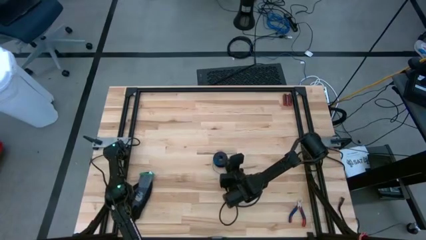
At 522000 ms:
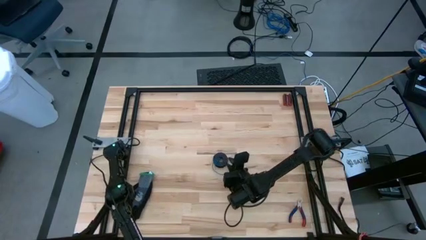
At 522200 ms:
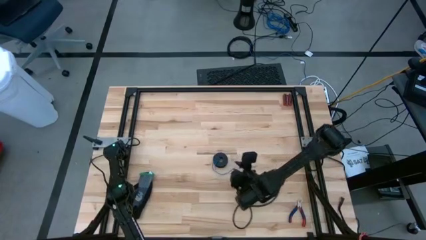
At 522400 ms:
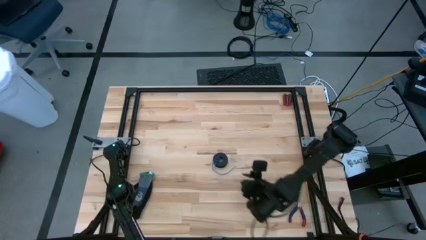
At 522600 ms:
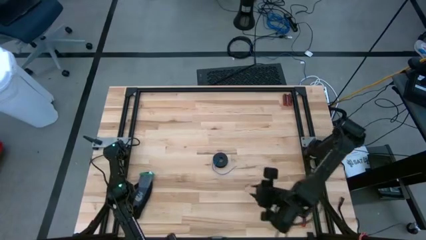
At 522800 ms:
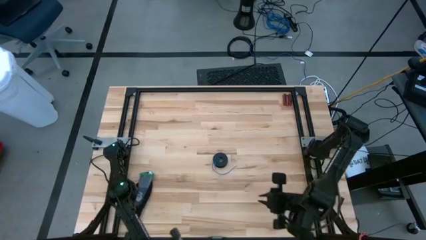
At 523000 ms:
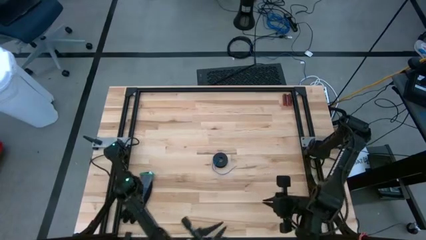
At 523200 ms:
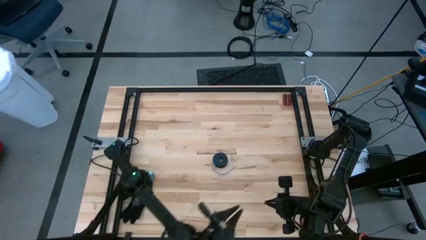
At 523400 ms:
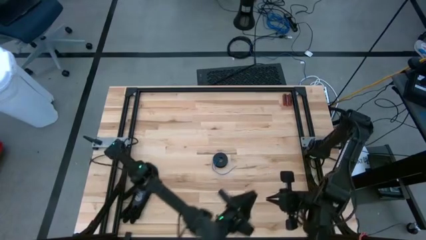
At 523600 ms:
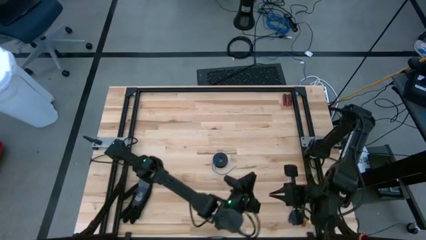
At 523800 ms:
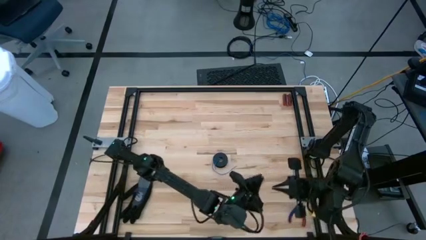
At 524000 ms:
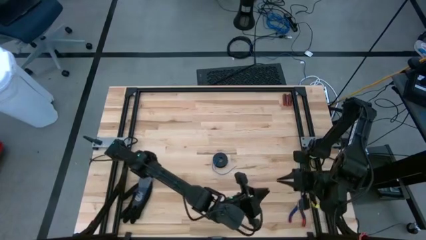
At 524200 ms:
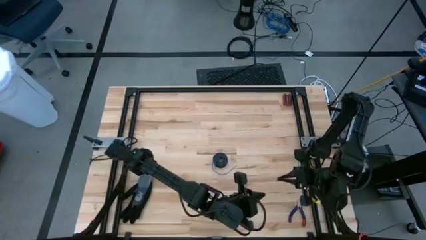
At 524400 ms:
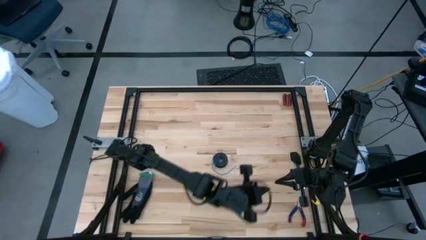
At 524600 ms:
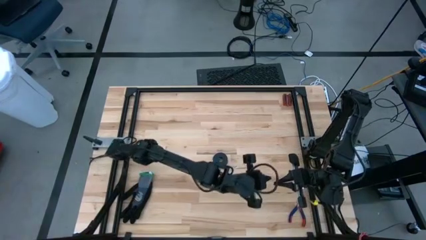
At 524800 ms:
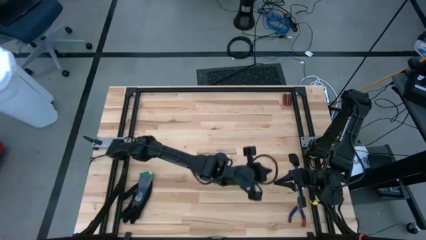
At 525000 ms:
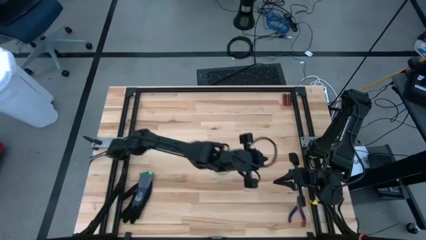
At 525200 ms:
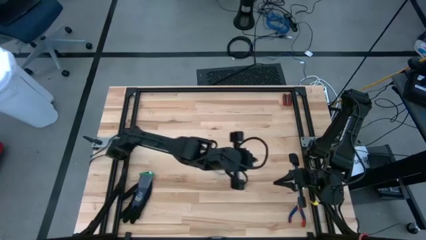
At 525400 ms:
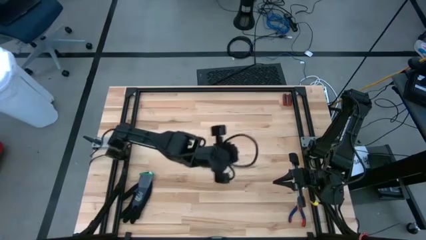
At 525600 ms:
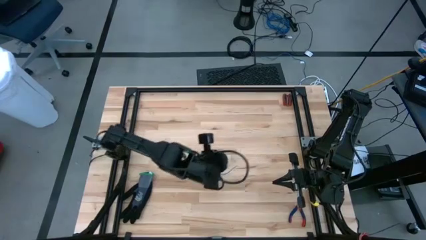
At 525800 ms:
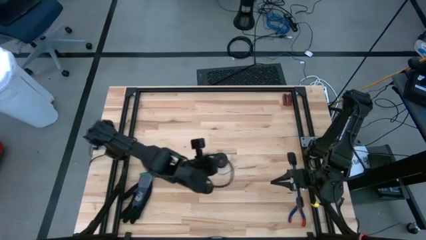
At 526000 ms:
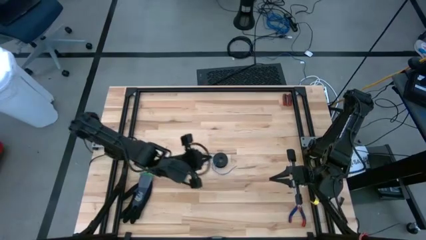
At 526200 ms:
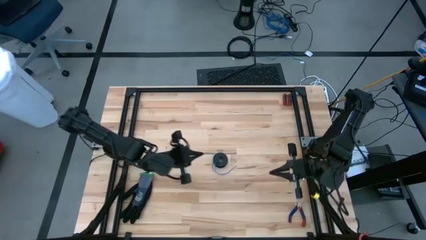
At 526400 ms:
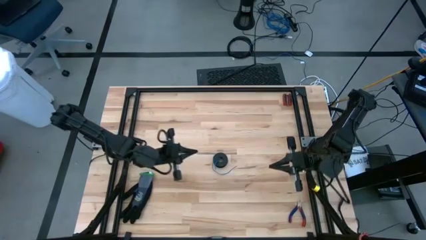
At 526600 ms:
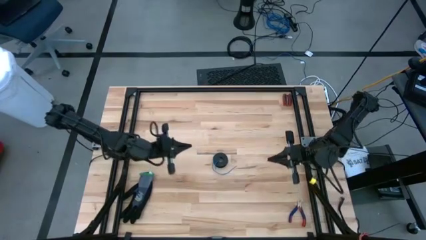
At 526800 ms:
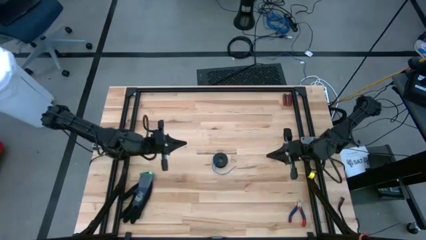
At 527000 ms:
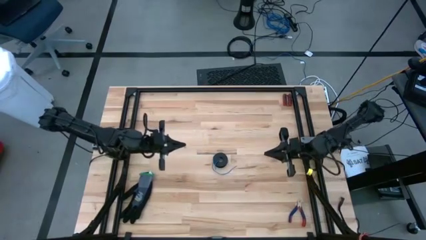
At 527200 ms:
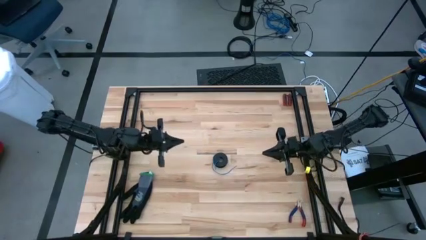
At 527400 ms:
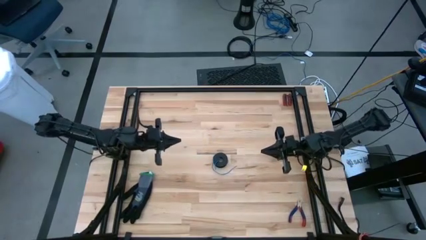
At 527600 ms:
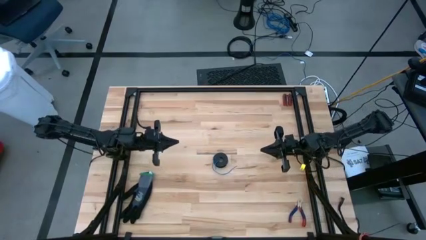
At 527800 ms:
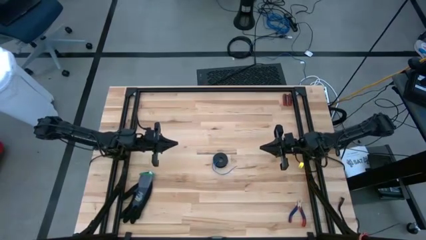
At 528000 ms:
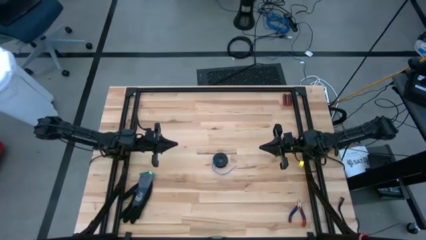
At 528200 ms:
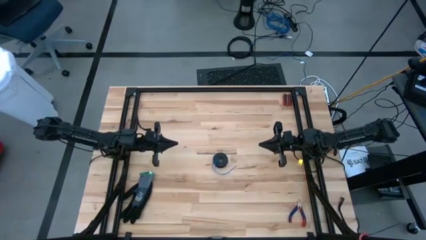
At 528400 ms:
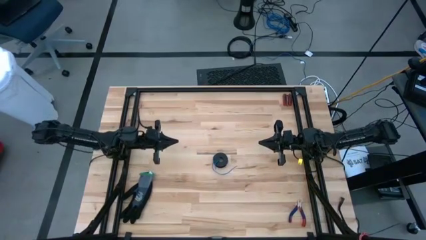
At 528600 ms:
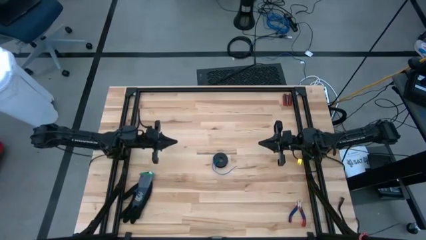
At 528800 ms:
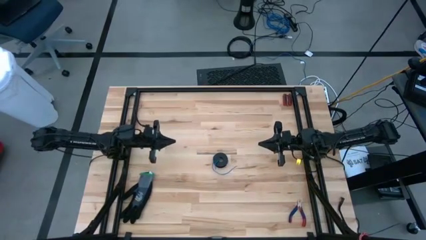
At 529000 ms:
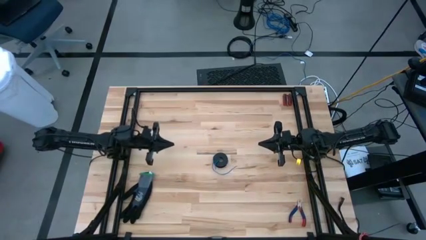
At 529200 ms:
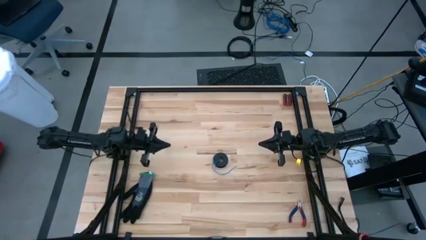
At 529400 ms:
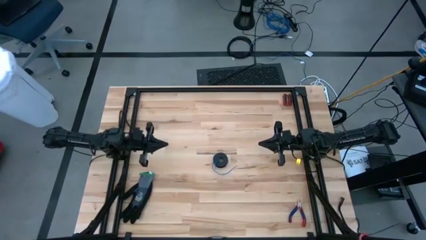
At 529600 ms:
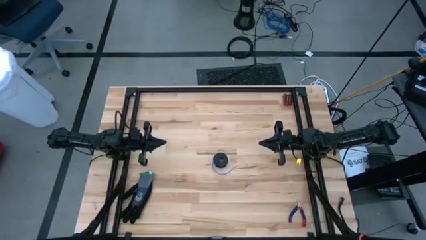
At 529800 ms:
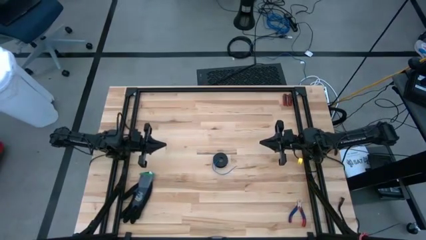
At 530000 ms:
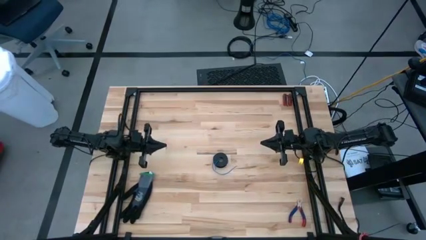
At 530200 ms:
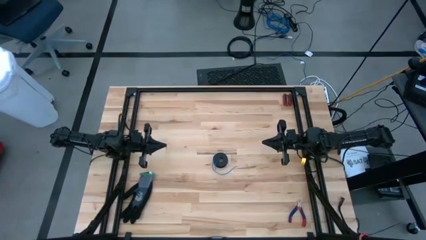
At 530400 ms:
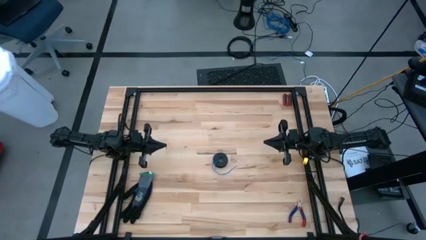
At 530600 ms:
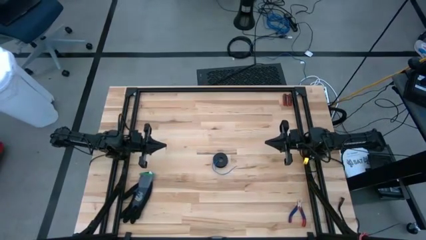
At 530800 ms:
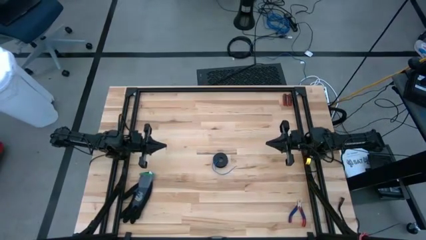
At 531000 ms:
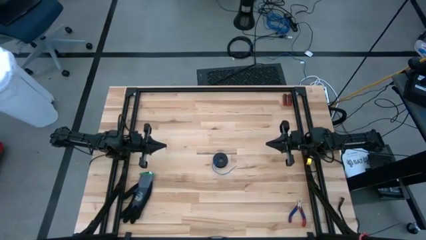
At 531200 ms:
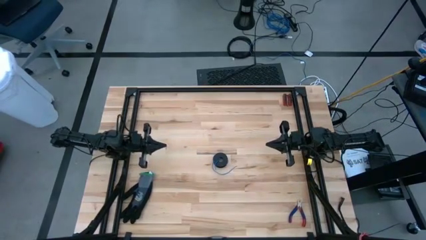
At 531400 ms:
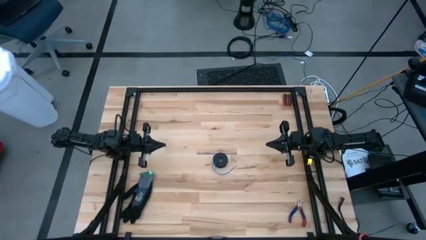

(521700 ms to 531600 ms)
Task: Coil cords
Return to Home Position

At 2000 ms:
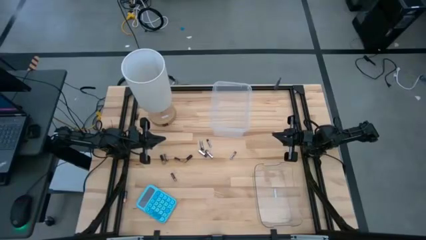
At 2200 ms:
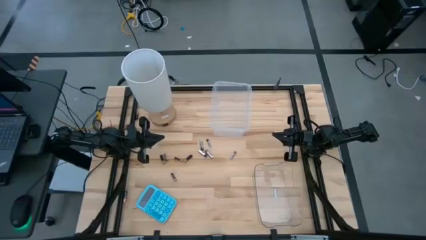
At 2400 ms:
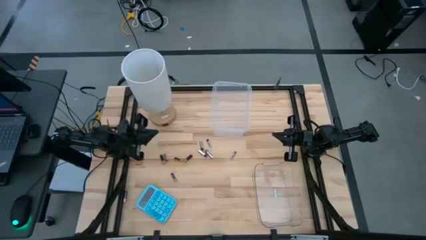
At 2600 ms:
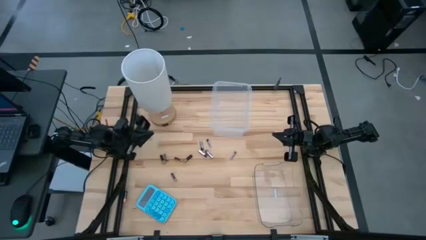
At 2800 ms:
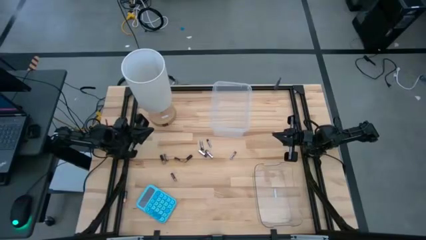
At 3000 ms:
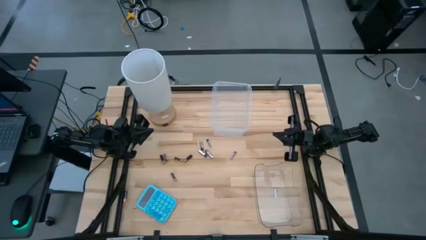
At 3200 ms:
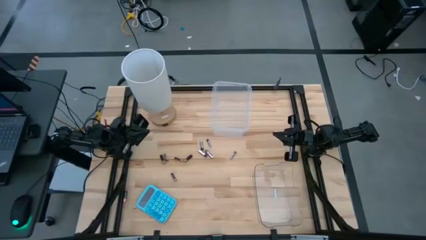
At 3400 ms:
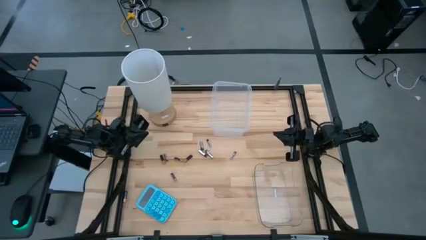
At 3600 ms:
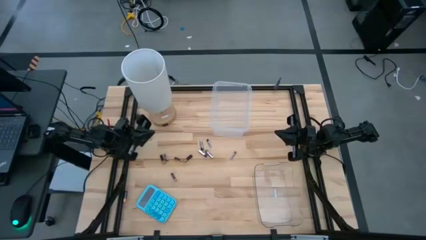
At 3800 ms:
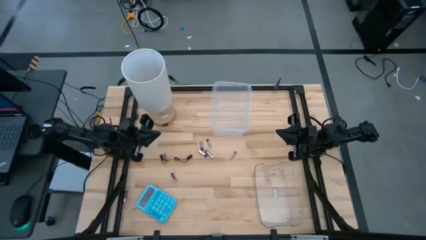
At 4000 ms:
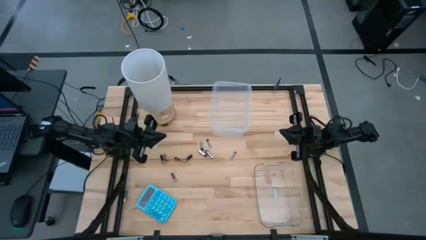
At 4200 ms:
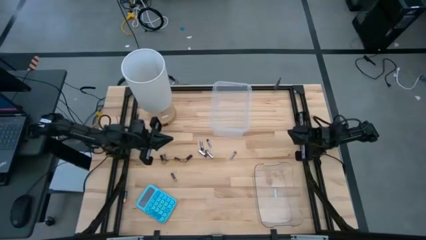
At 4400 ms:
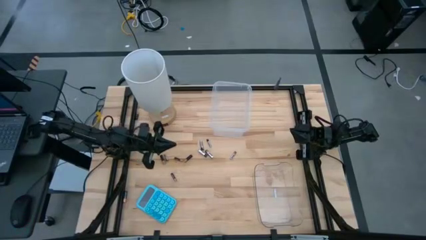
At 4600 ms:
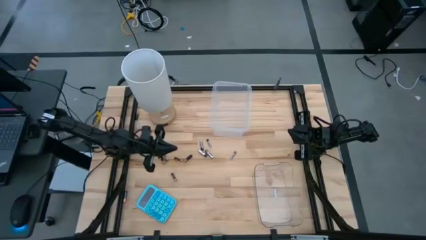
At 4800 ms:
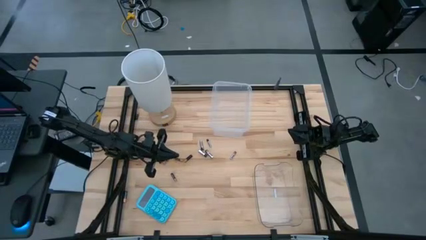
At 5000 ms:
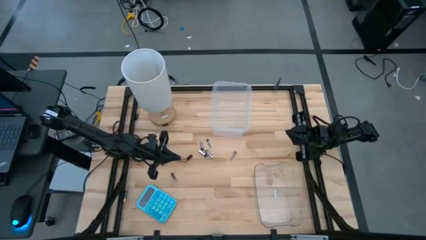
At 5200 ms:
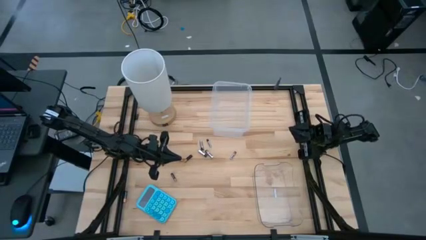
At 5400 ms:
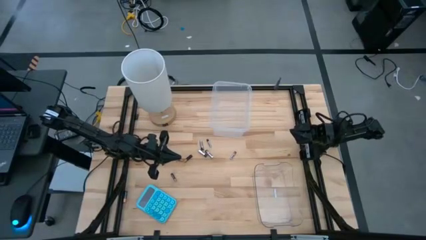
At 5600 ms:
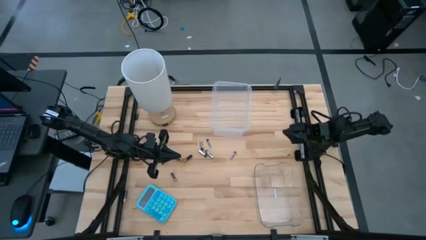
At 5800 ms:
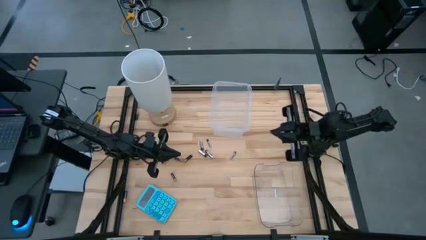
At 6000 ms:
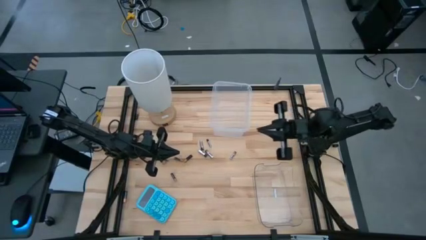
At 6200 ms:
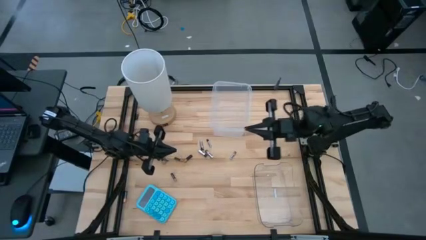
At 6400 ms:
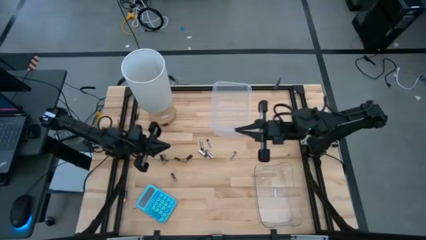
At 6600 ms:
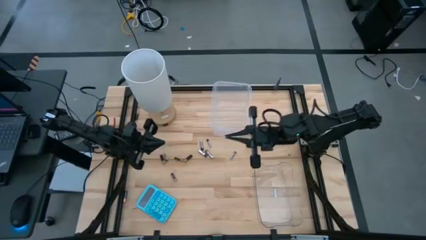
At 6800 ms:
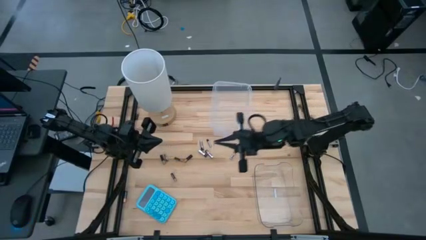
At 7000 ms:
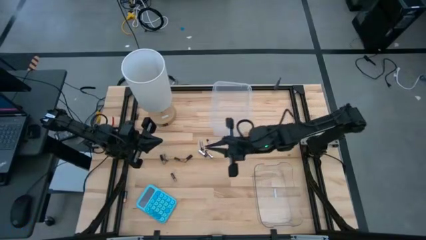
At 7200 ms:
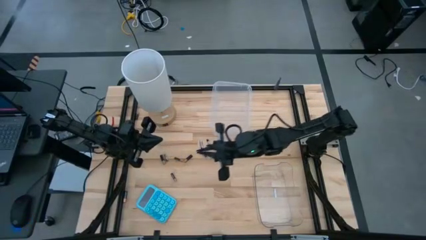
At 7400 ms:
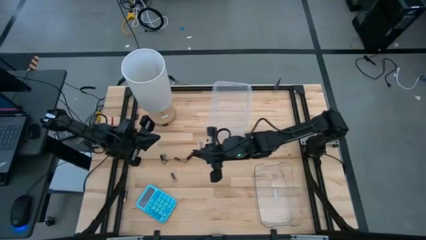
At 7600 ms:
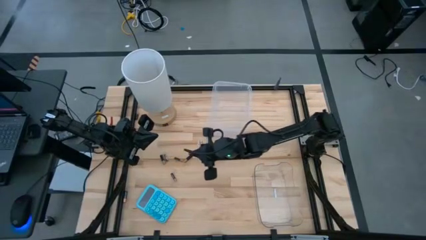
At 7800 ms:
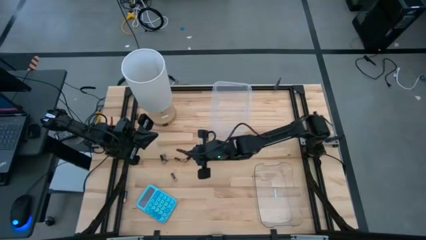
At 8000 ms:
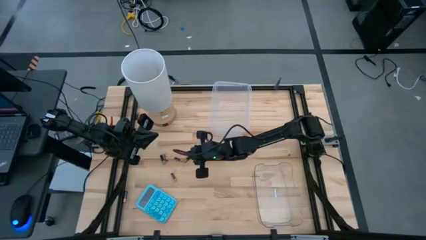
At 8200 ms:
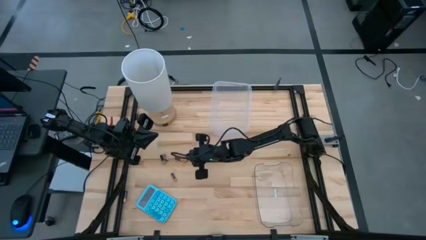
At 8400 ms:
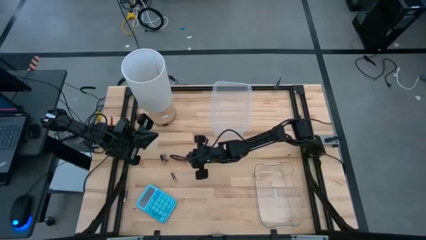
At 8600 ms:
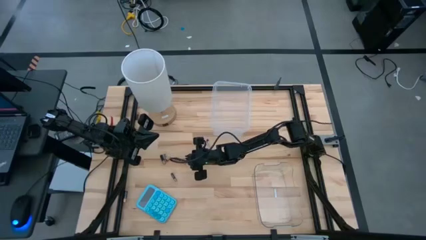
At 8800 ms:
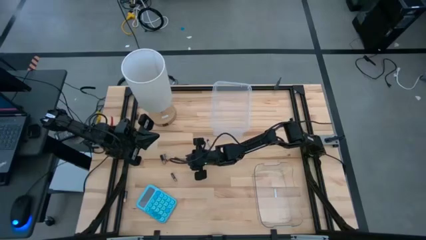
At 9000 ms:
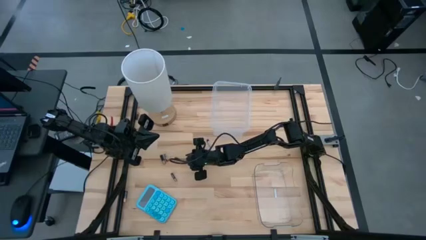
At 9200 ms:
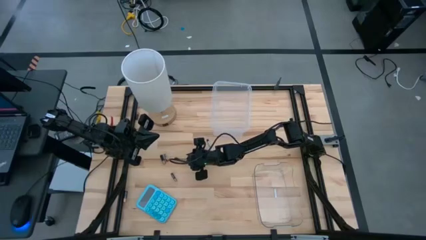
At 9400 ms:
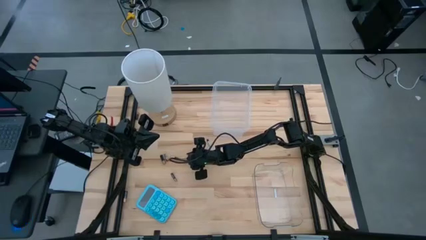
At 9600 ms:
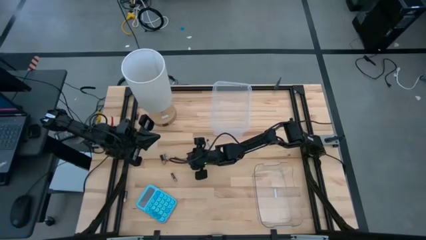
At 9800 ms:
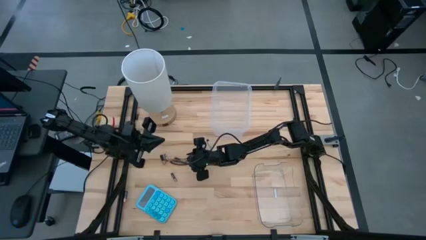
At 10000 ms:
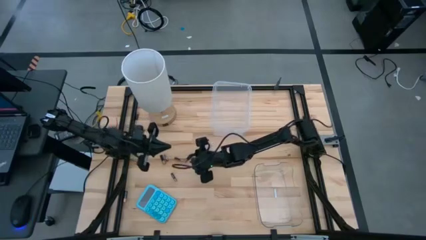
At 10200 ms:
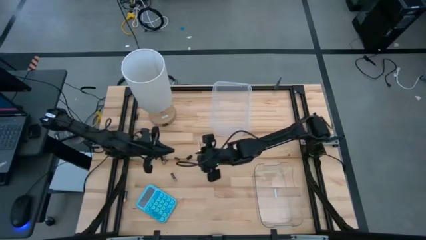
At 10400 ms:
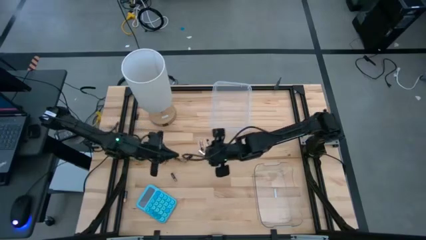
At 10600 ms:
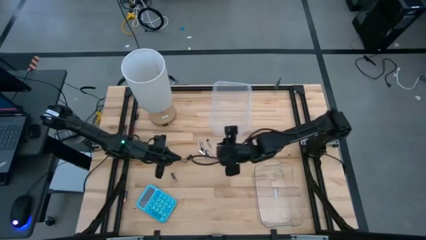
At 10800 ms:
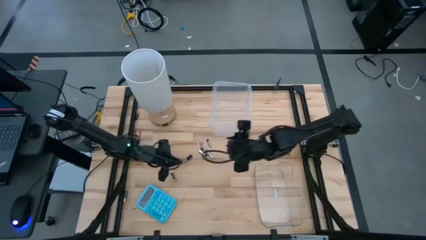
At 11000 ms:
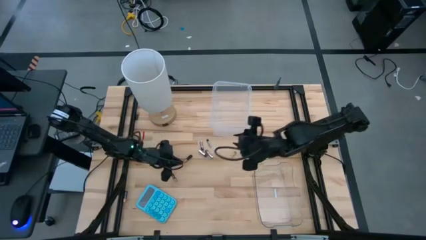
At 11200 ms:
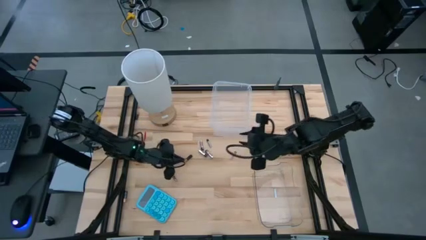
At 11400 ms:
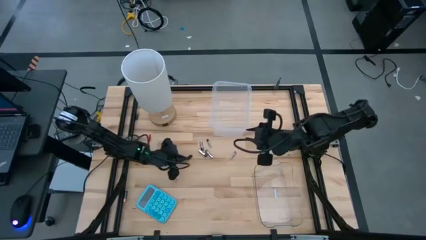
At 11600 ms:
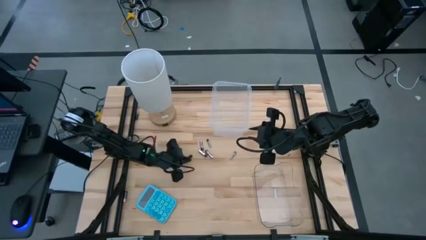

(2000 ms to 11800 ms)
Task: Sort batteries
Put the brown battery into the top transparent bin
